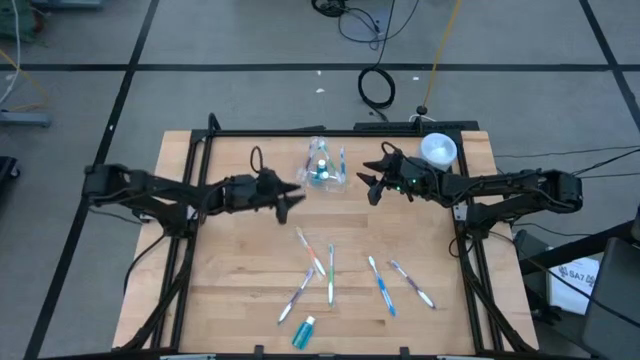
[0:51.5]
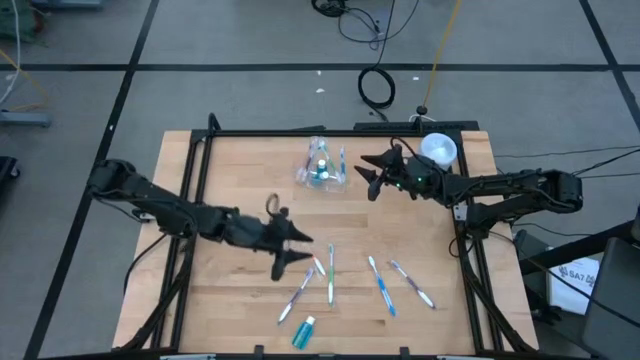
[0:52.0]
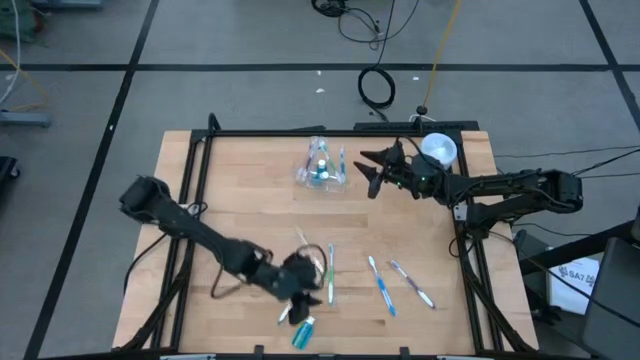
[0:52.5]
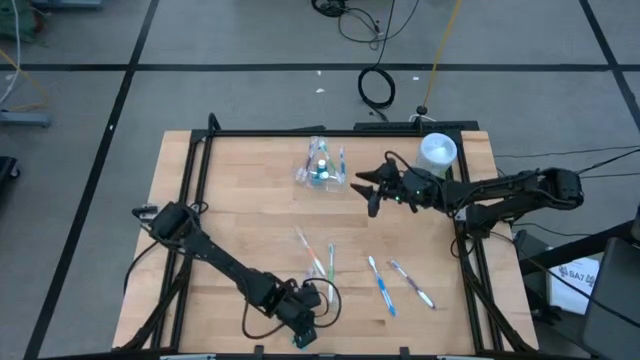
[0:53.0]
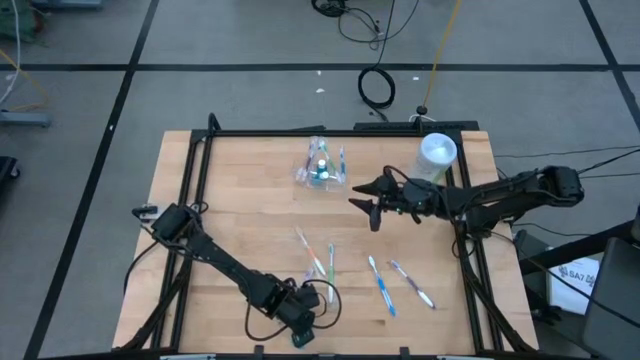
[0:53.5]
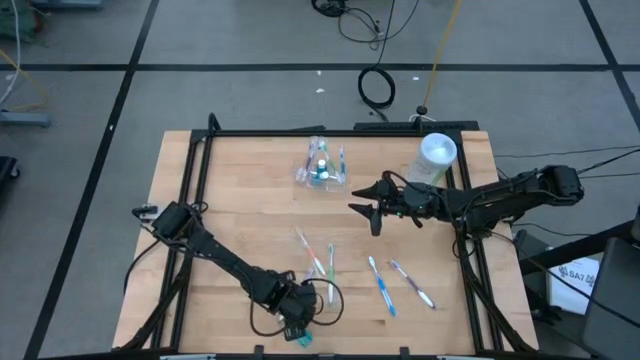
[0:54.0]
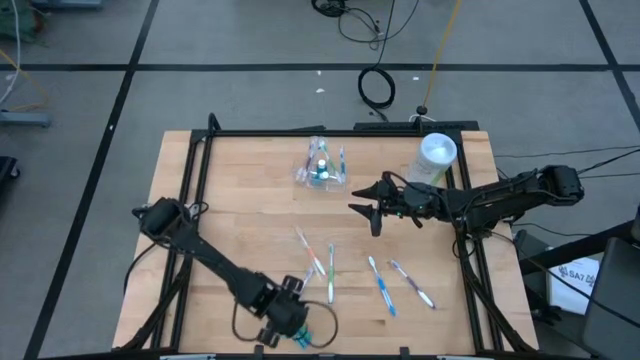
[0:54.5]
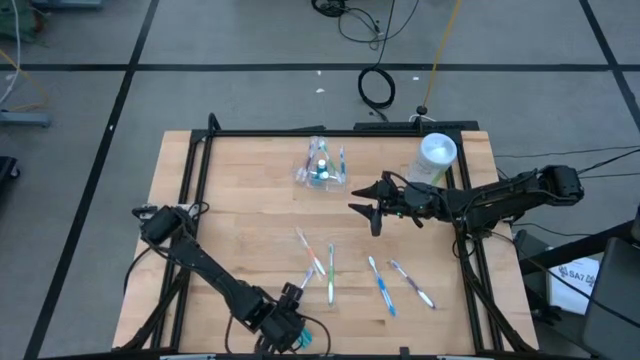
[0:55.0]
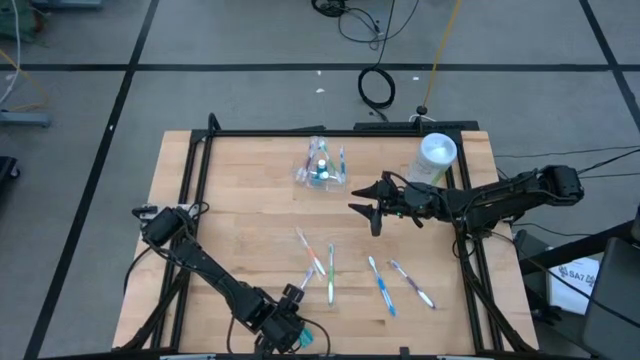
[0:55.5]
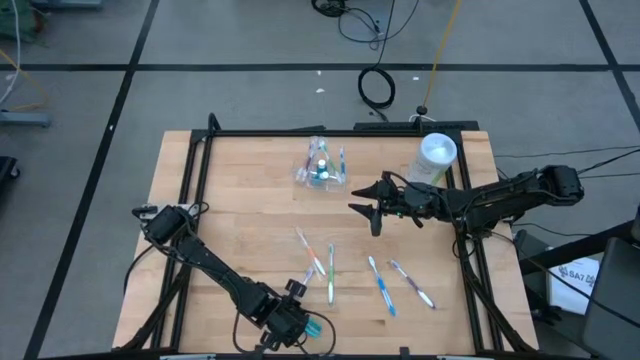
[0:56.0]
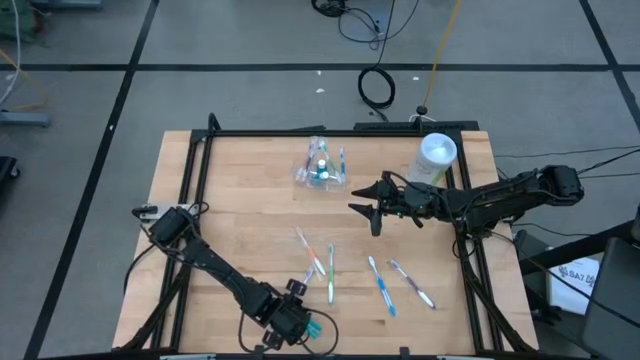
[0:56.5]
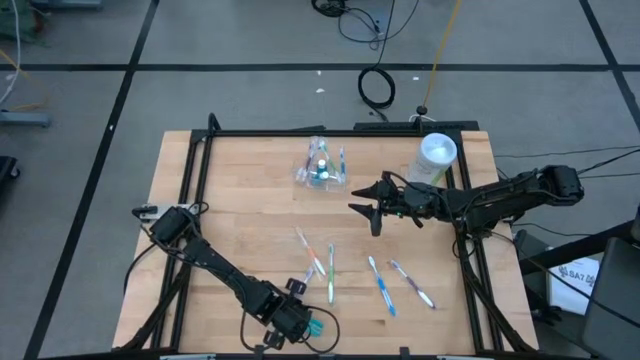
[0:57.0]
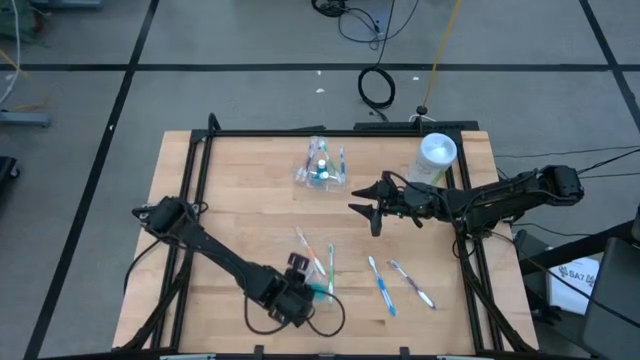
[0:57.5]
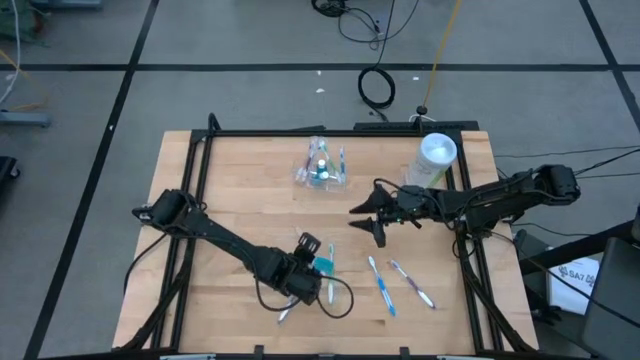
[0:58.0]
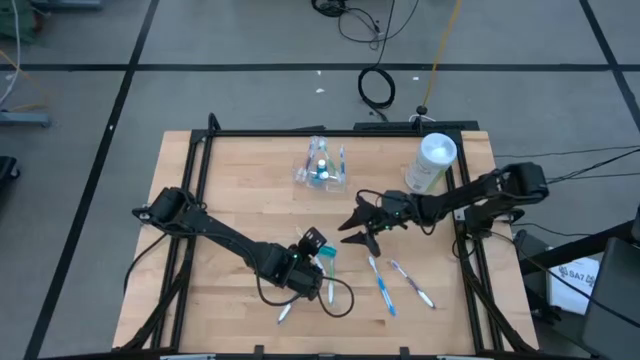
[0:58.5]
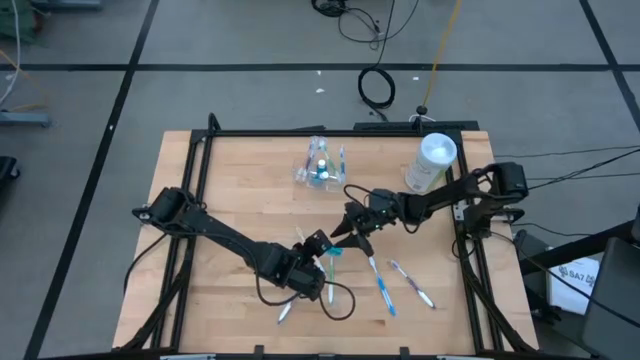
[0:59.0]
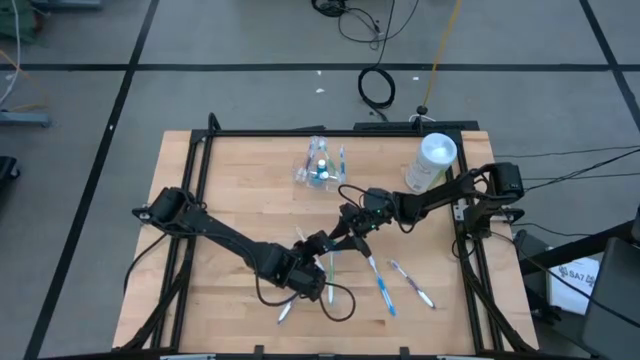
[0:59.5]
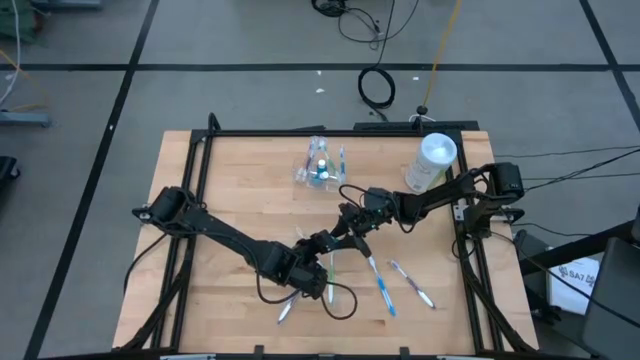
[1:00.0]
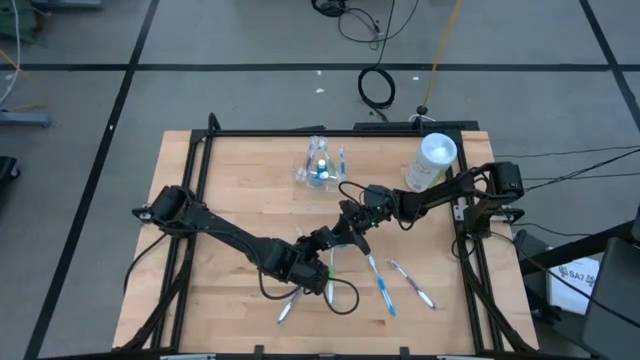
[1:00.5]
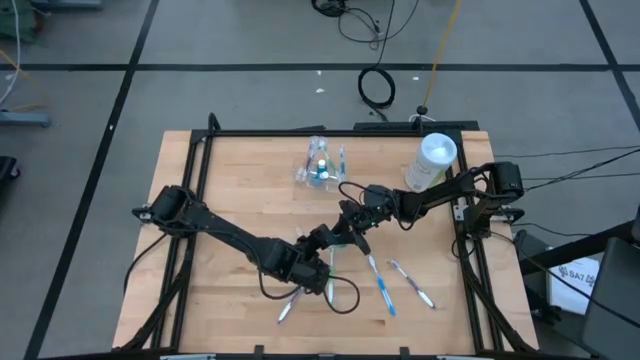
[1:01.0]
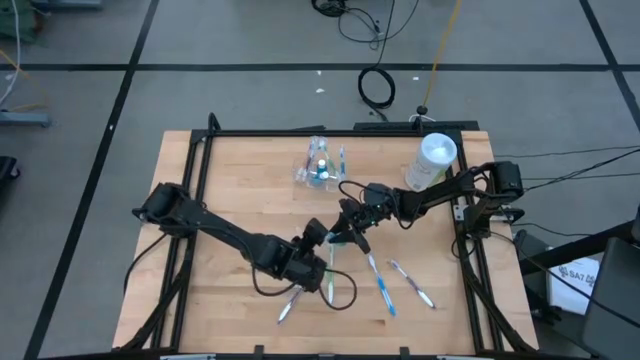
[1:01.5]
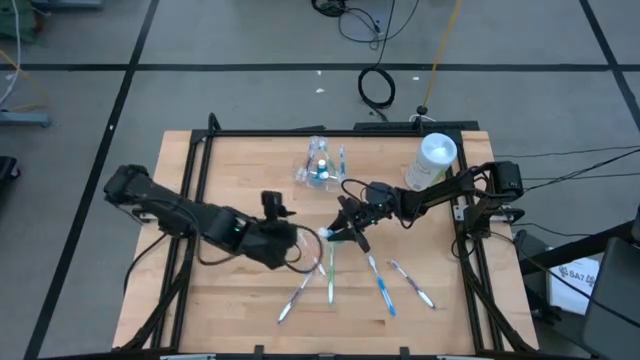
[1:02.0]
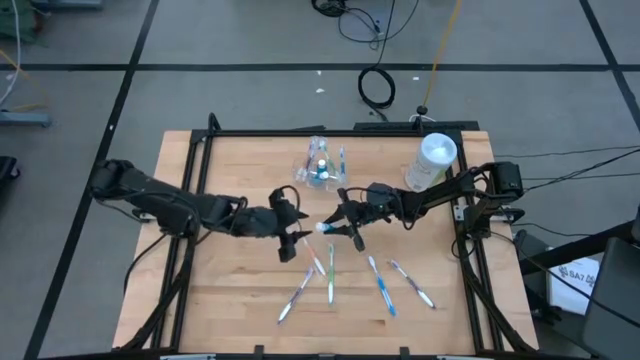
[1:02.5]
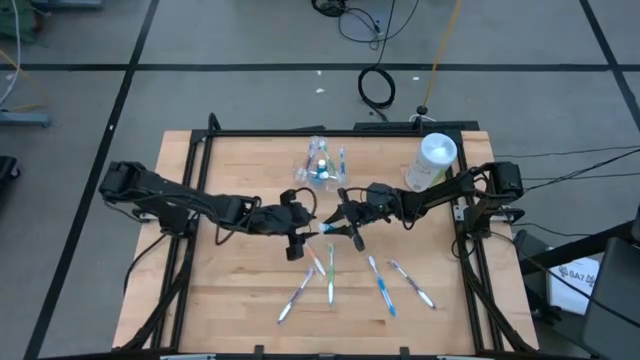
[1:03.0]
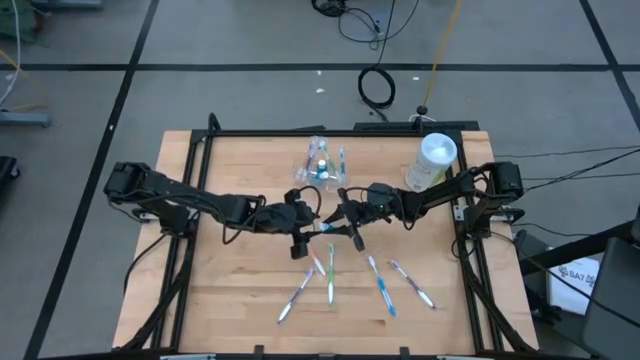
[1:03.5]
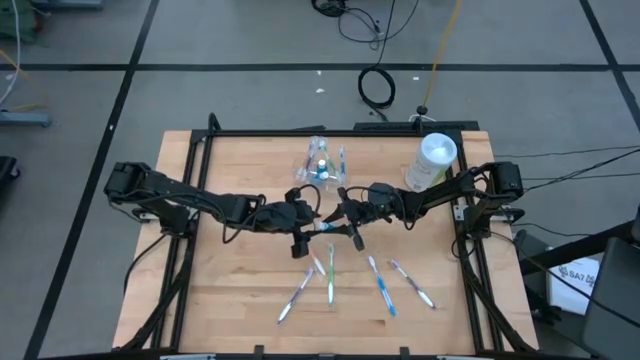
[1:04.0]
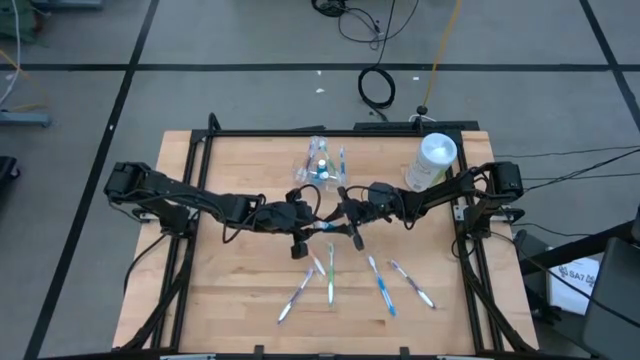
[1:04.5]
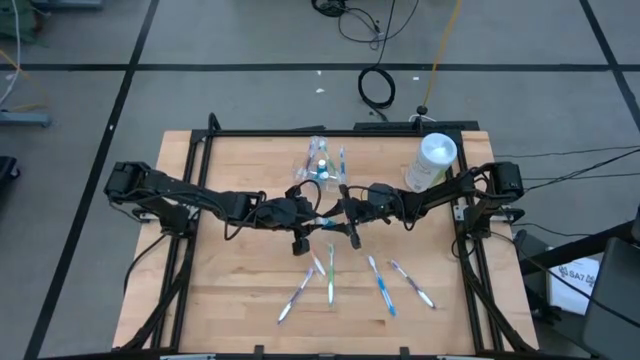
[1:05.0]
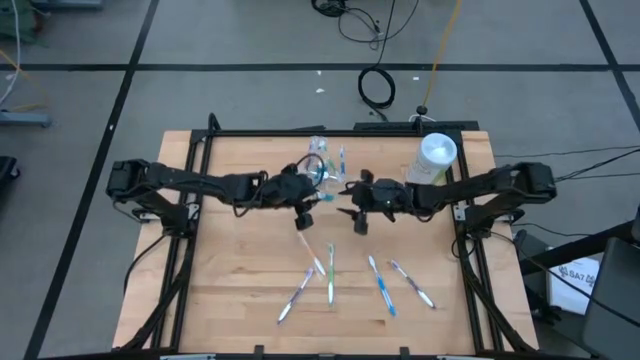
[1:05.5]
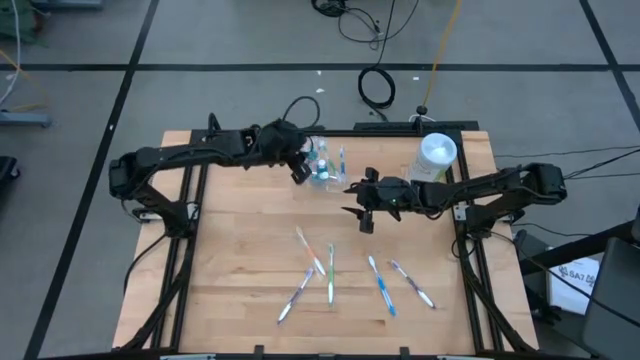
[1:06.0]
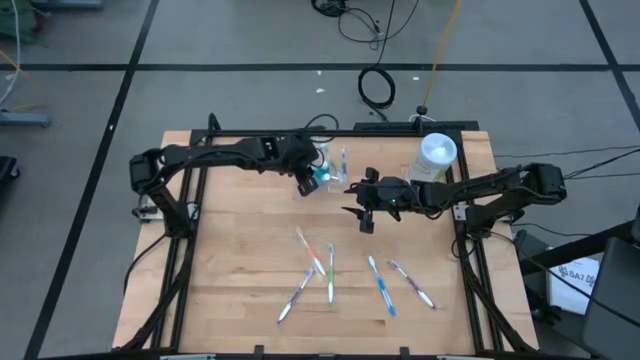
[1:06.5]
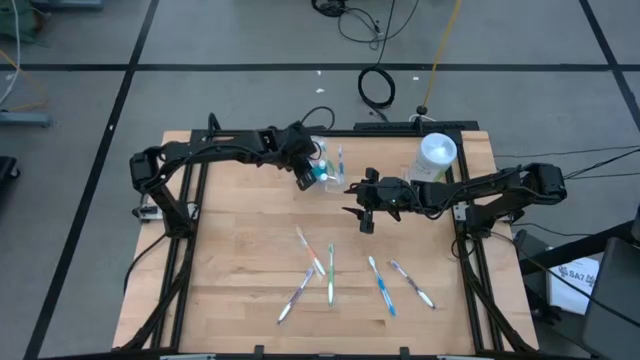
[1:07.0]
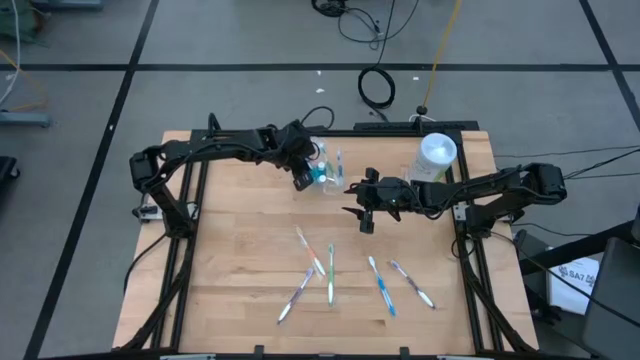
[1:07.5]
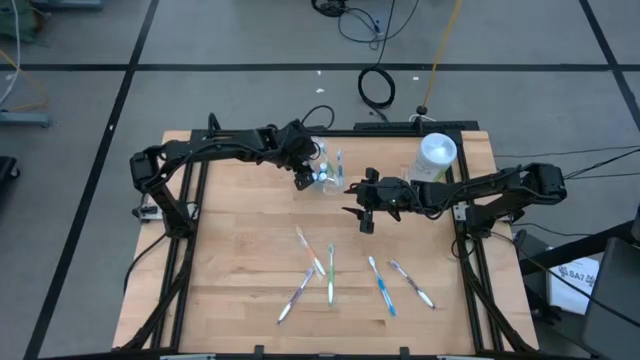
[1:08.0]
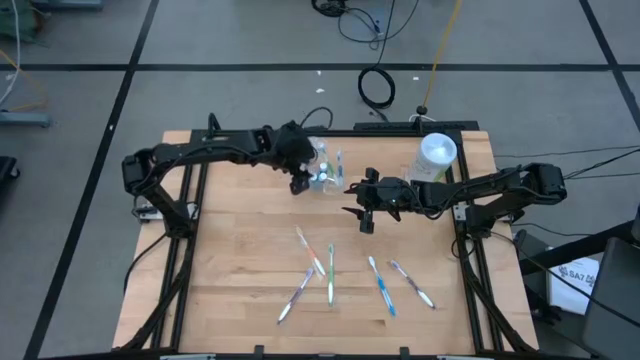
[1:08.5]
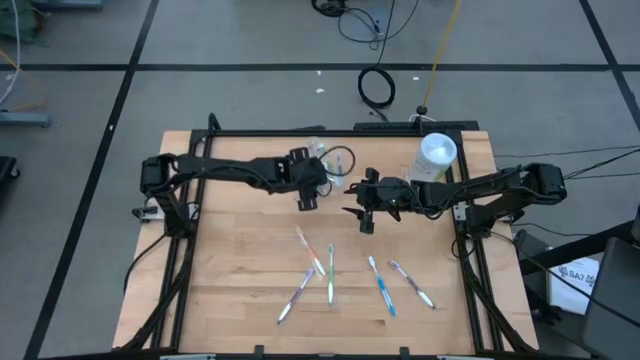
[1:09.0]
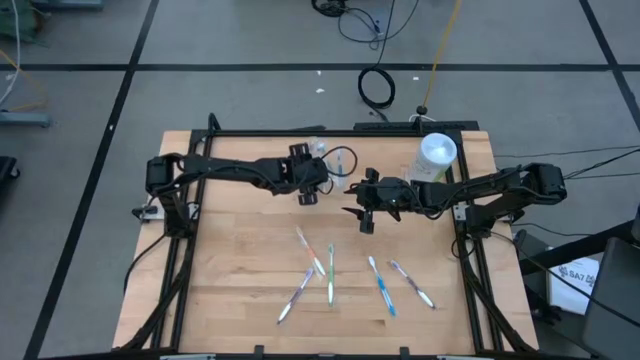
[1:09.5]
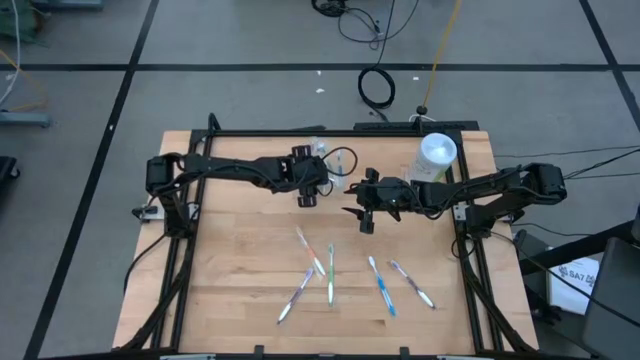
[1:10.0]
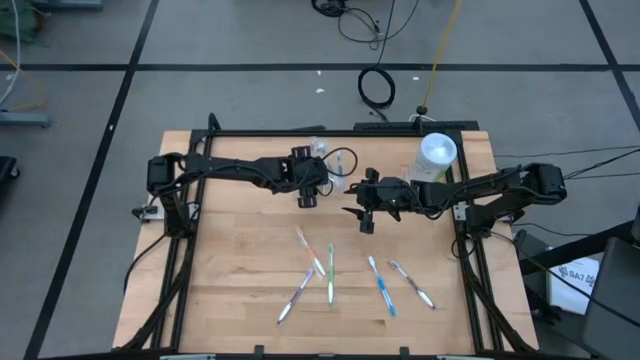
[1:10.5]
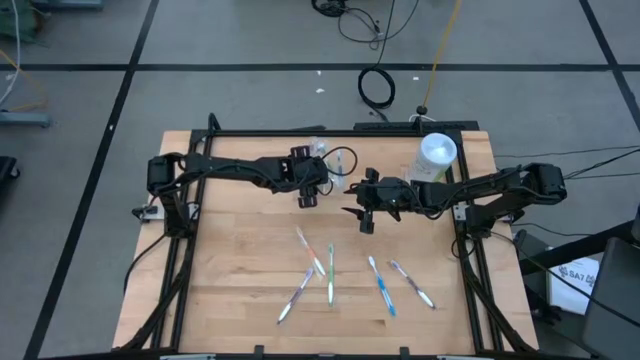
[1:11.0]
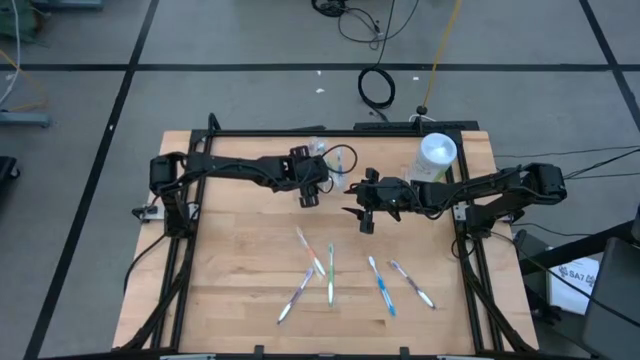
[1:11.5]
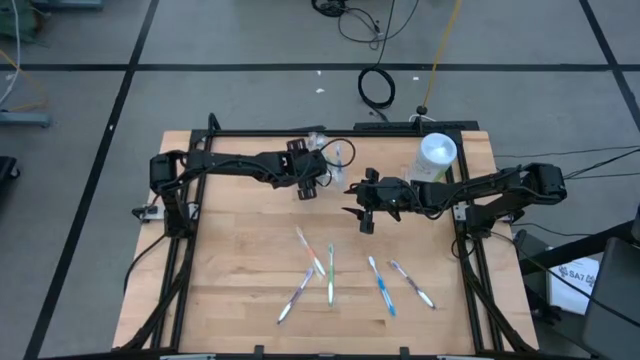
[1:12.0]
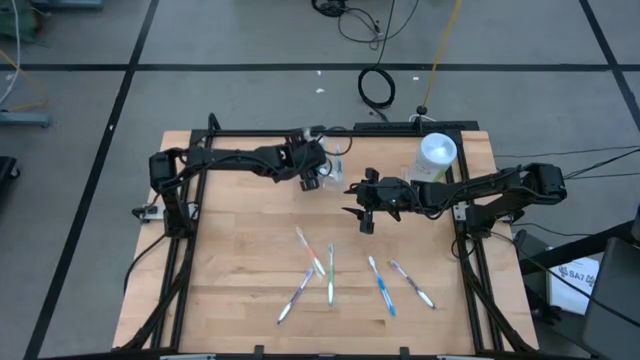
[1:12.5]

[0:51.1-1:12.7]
Task: Pick & Place toothbrushing station
Put the blue mouthwash into the transparent organizer

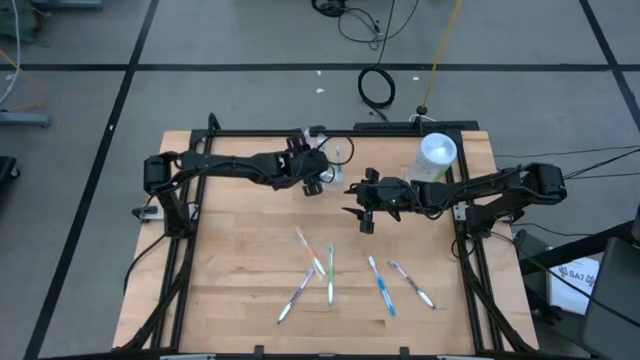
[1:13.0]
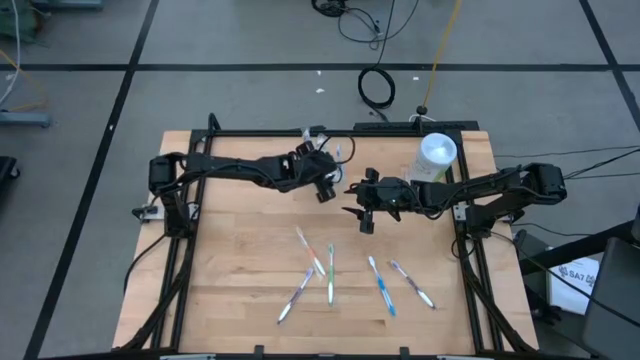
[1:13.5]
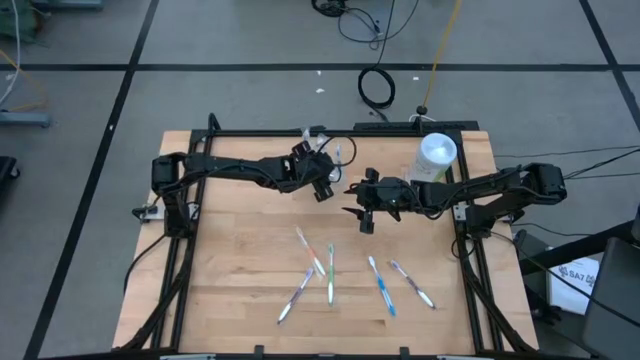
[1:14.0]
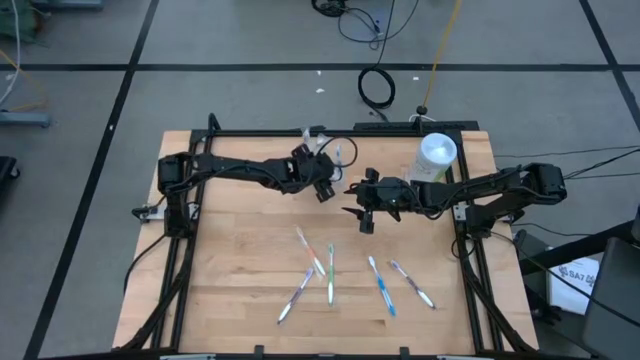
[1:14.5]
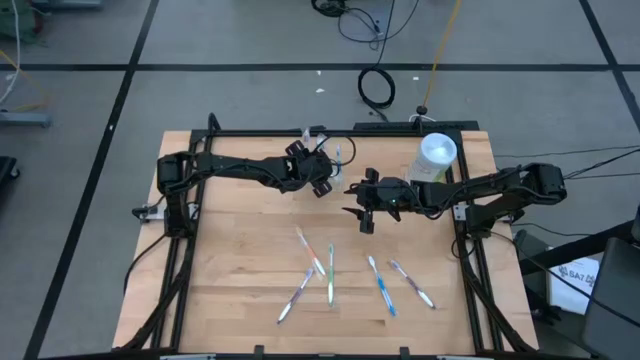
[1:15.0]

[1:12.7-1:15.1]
Adjust the blue mouthwash in the transparent organizer
